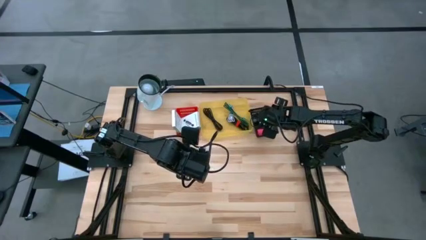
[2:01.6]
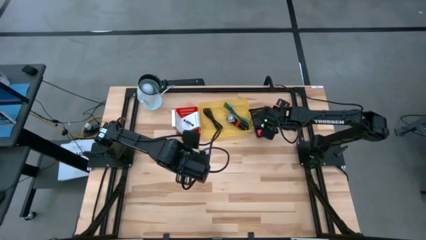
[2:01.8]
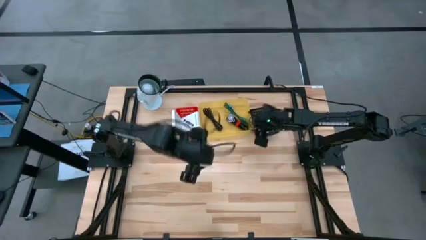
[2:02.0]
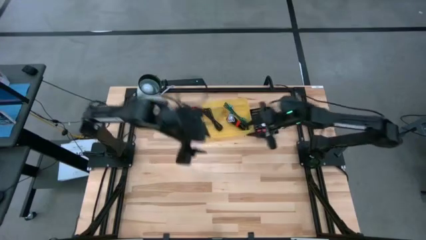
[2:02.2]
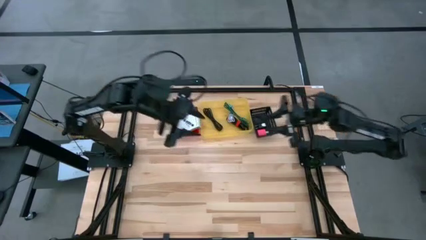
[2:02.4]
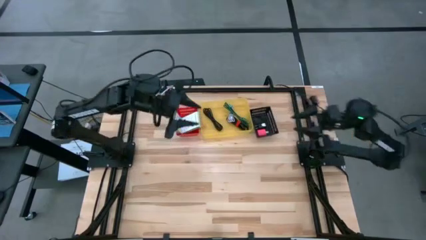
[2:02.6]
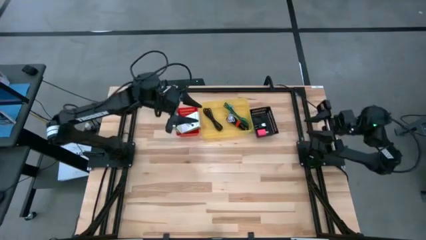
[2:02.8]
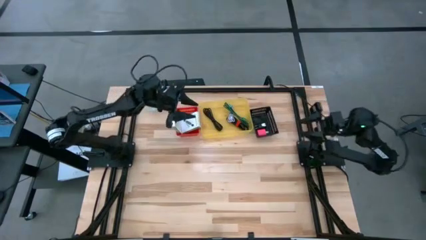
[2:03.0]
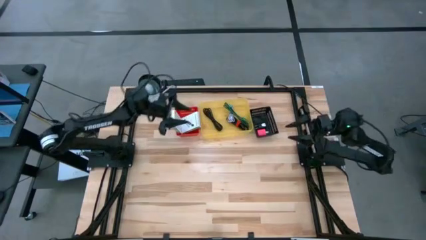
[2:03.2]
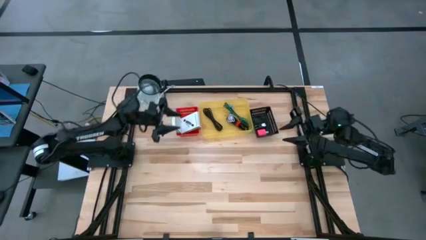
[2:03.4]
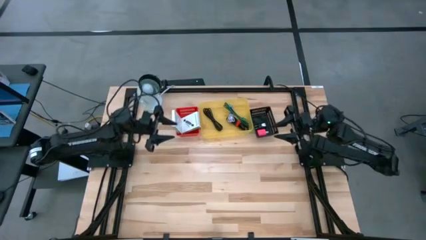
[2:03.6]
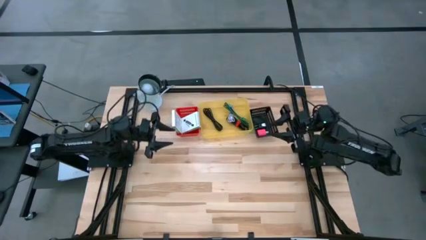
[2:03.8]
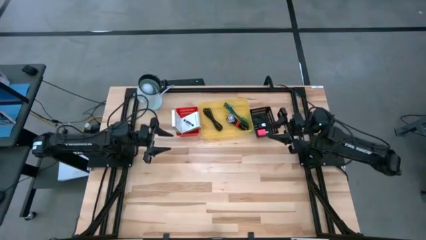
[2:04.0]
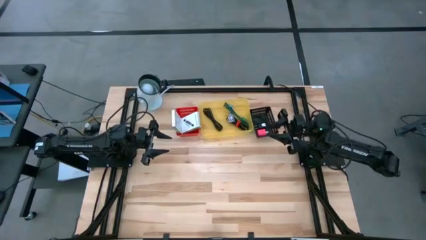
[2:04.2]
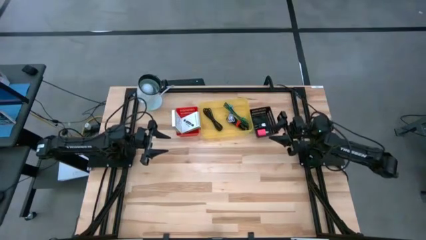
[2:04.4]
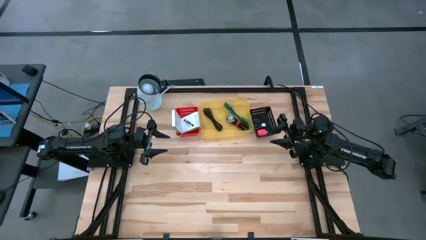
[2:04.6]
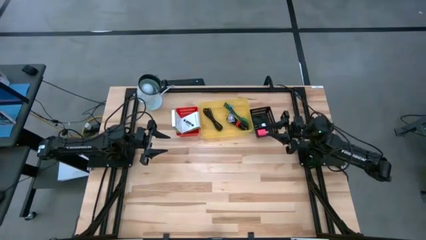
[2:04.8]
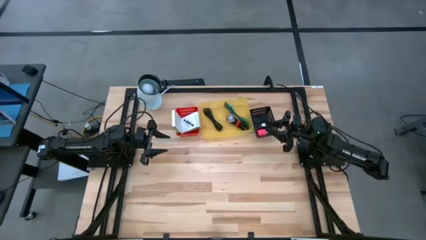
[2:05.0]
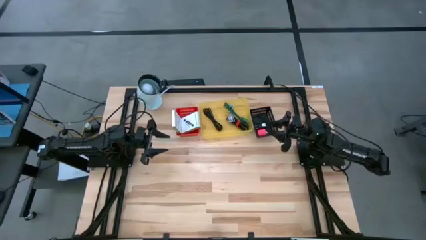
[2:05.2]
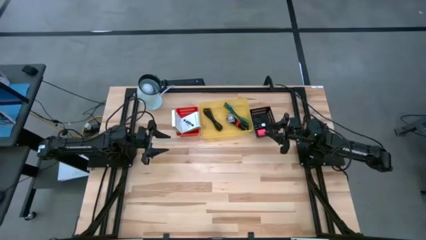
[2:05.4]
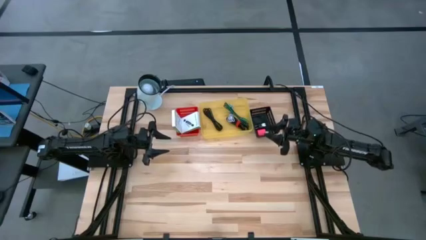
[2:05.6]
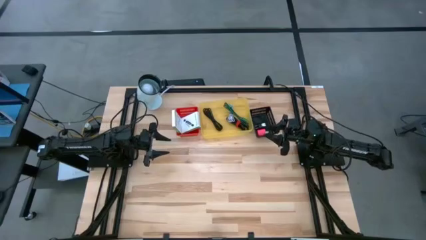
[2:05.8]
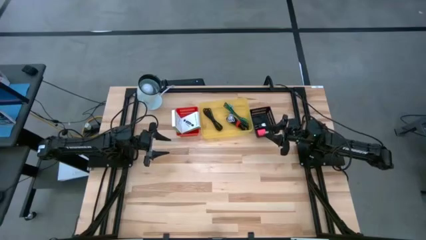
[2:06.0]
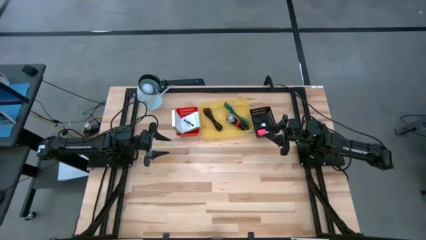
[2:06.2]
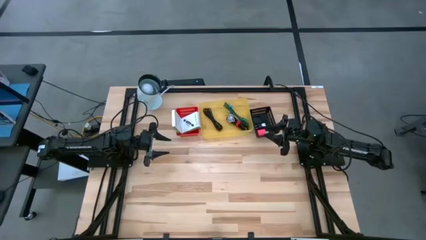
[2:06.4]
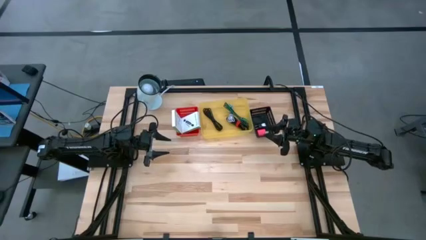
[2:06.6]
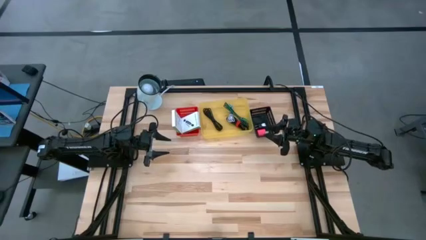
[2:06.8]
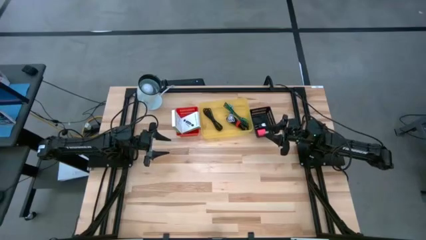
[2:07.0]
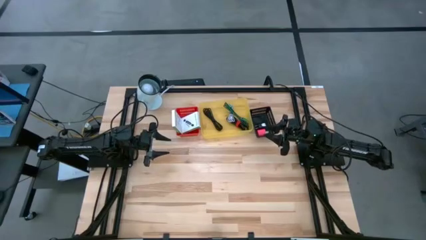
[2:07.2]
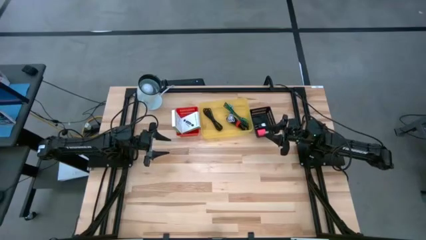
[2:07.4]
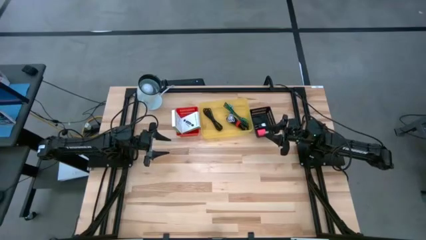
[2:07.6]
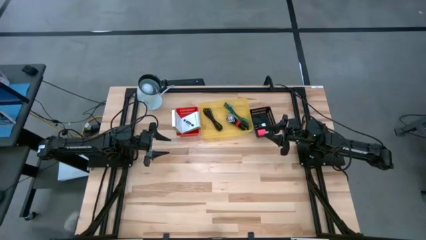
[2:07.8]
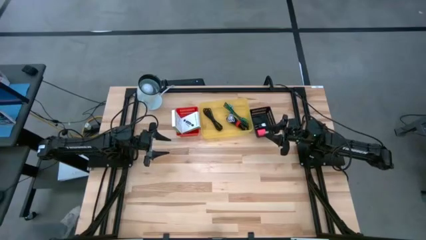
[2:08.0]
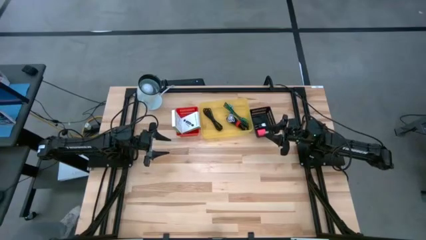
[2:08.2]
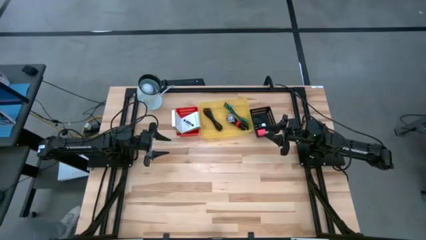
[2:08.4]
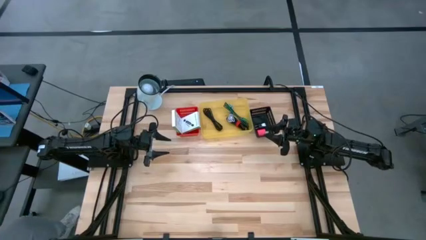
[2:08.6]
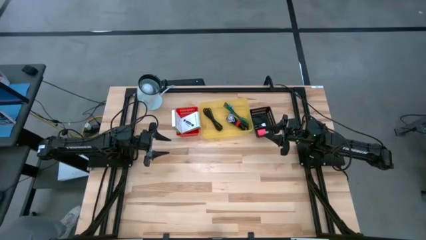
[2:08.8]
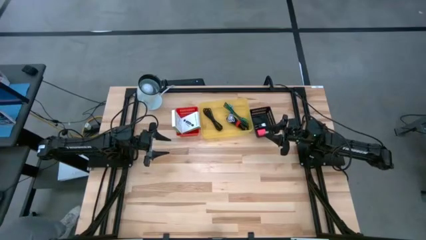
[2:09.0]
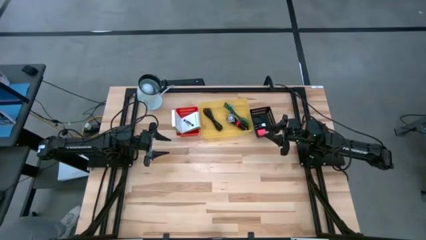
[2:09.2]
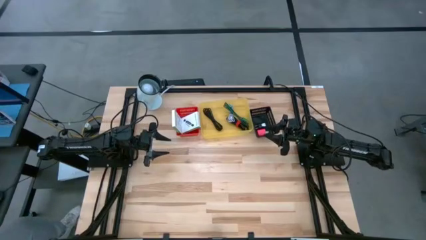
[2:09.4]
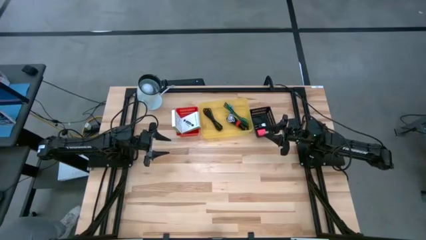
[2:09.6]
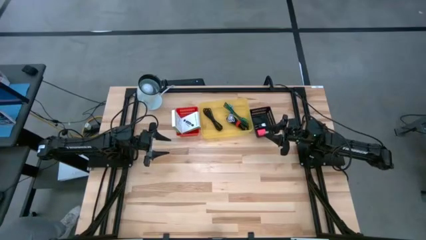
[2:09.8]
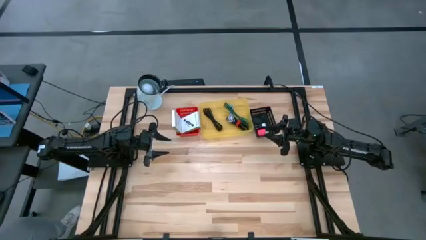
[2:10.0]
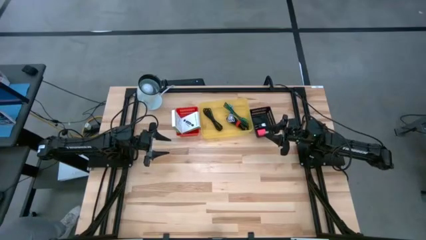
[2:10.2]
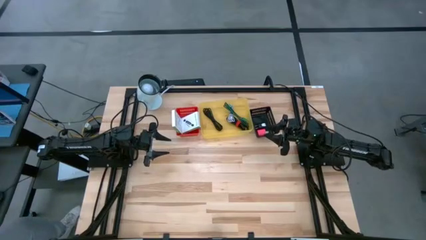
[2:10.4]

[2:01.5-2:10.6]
Task: Pick and place items into bin
Return to Home Position

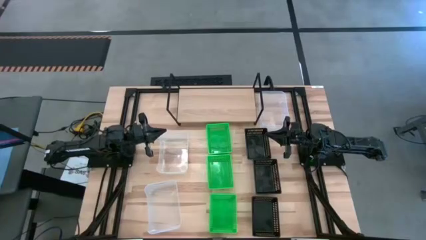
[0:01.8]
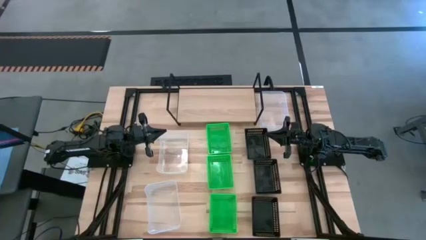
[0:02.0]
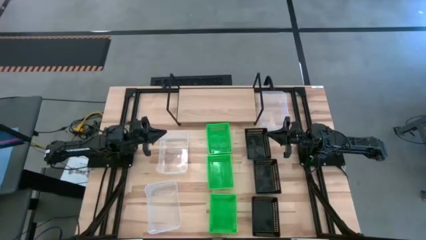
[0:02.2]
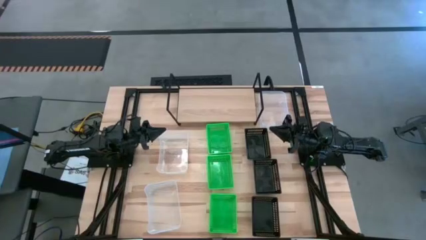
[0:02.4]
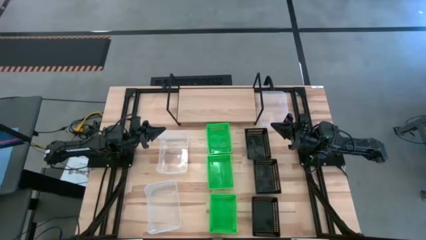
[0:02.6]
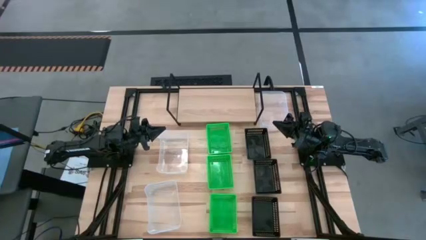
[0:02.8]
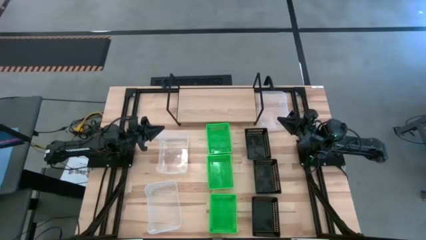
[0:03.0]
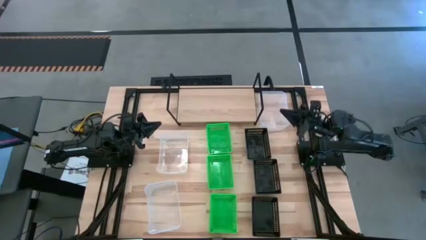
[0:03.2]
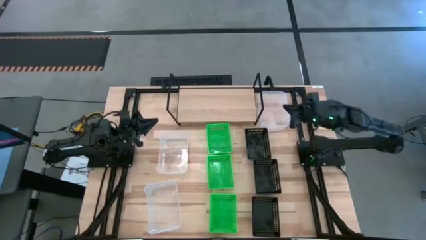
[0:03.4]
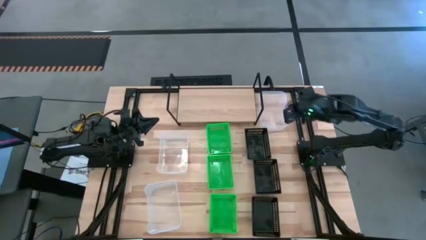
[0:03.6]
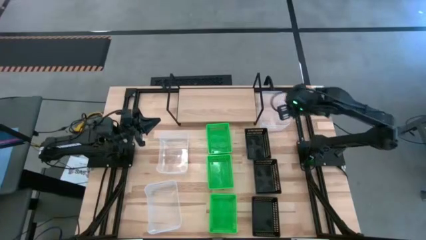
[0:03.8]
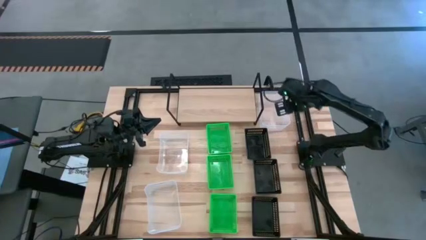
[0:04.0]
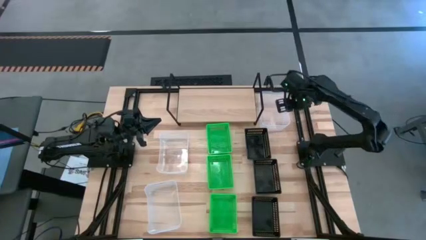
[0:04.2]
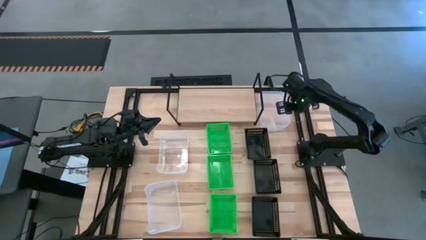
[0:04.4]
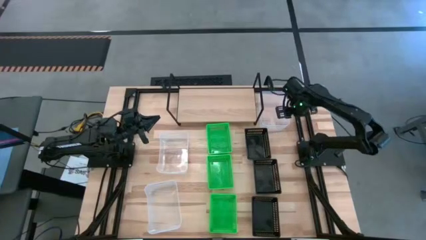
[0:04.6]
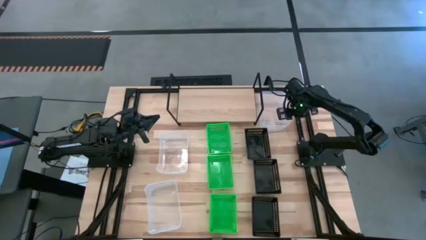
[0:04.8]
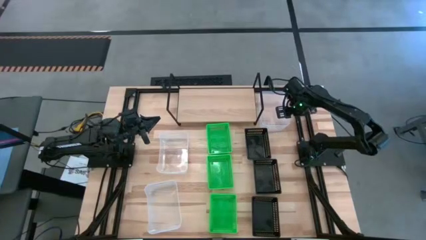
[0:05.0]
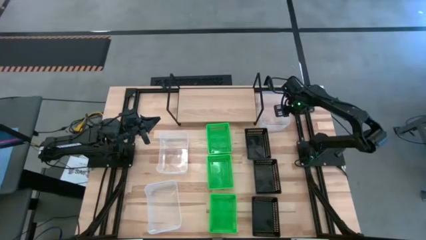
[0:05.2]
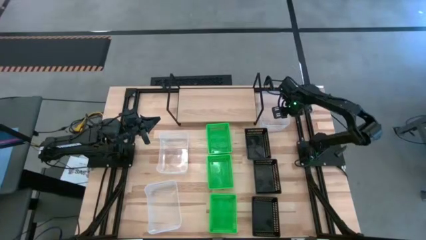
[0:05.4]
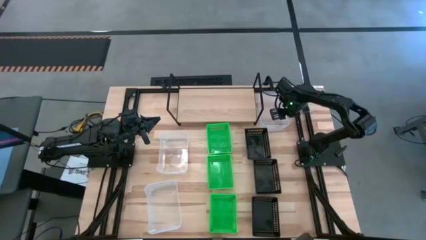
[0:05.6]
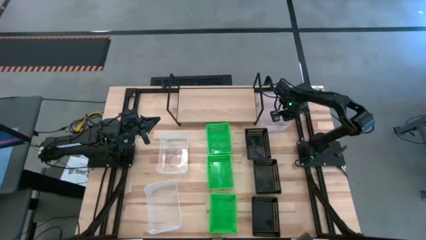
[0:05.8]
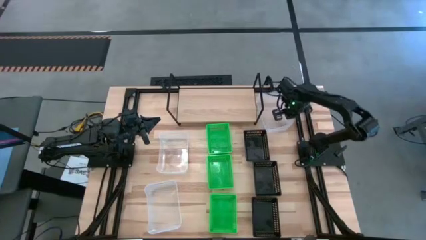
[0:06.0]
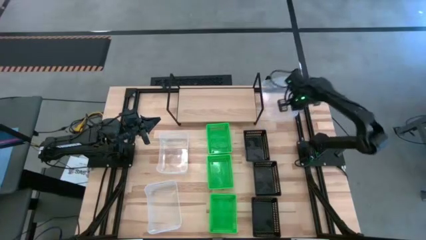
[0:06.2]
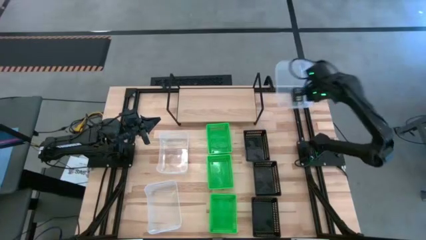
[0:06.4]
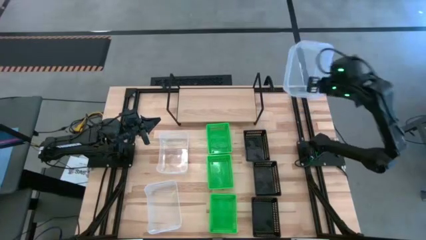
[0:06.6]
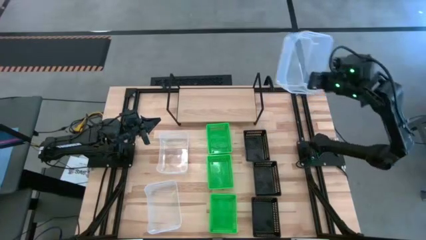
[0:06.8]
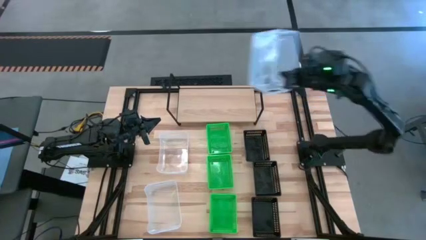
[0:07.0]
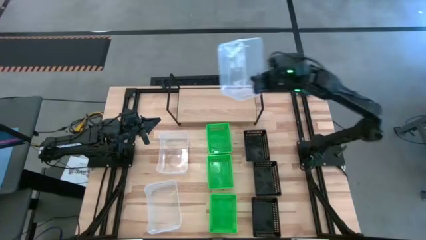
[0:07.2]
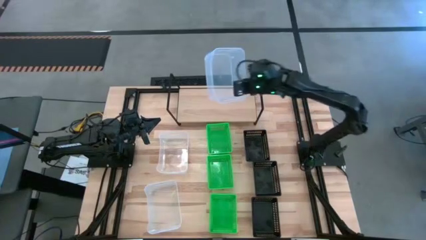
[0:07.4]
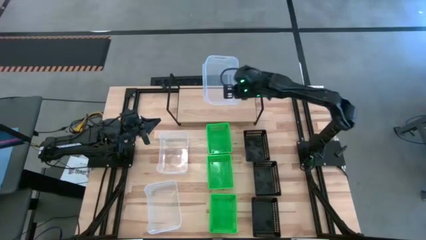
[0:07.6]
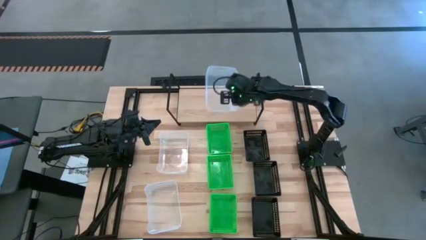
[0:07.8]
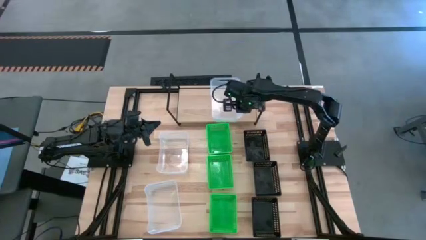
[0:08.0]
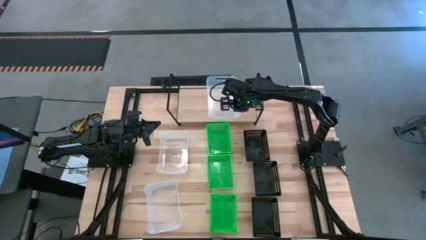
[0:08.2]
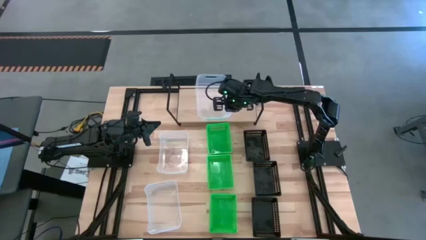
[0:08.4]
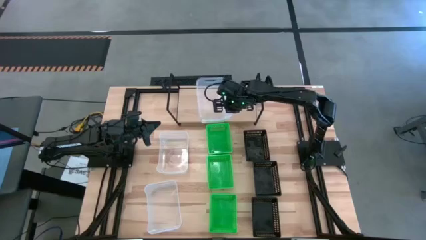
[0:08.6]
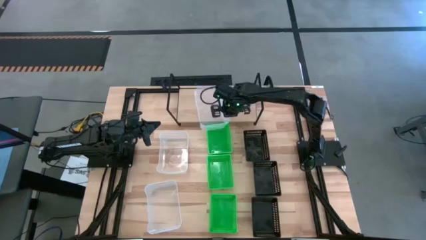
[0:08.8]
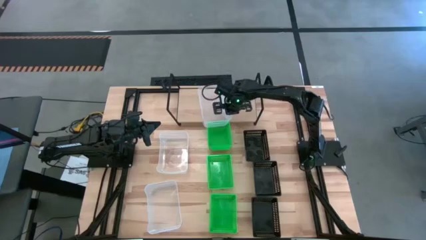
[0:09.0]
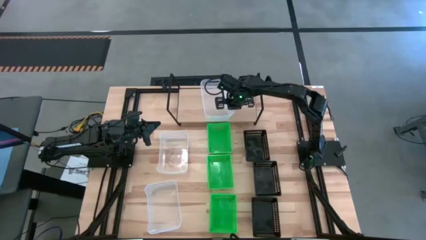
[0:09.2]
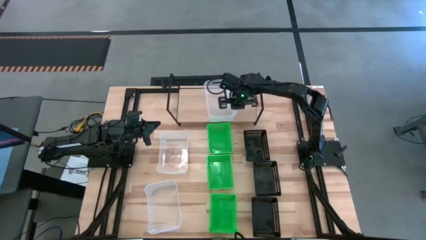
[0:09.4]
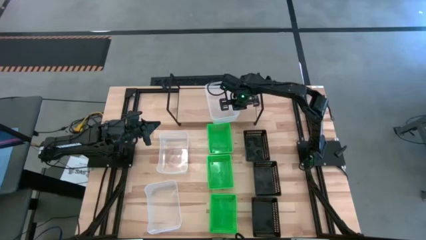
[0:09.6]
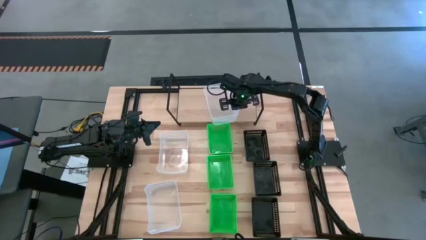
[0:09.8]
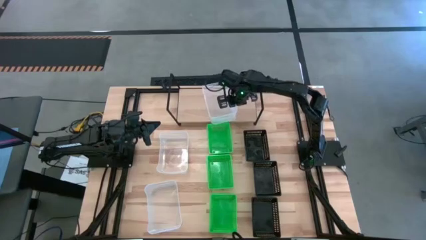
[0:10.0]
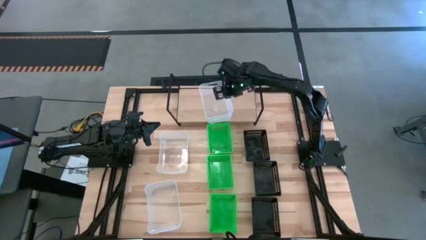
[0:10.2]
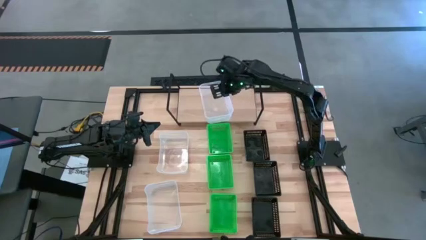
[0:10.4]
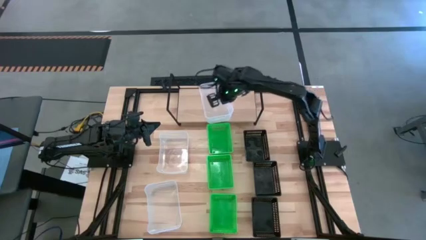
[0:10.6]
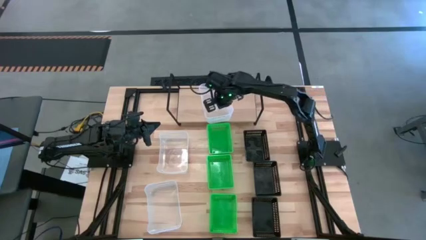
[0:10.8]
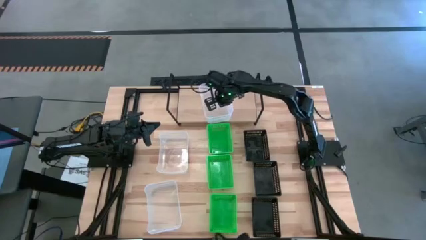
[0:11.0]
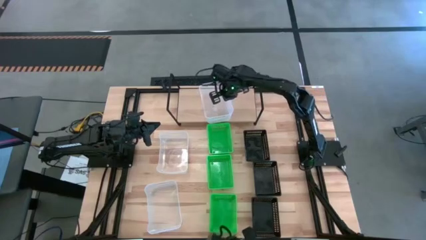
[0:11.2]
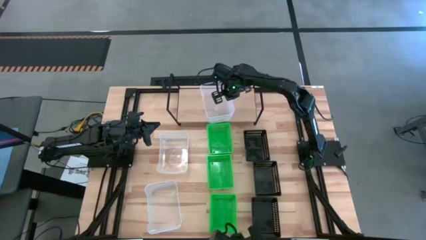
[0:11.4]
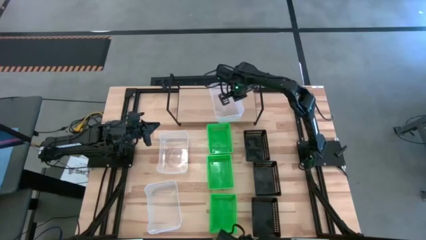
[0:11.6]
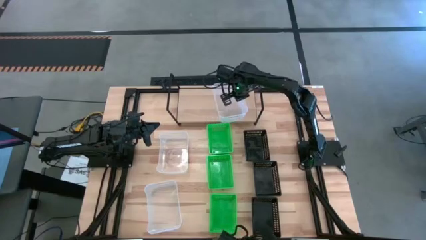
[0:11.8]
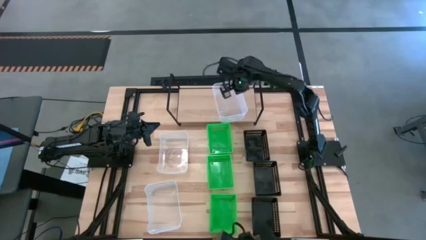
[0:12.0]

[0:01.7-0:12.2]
Task: Stack baskets on shelf by color
Put the top right transparent bin on the shelf
